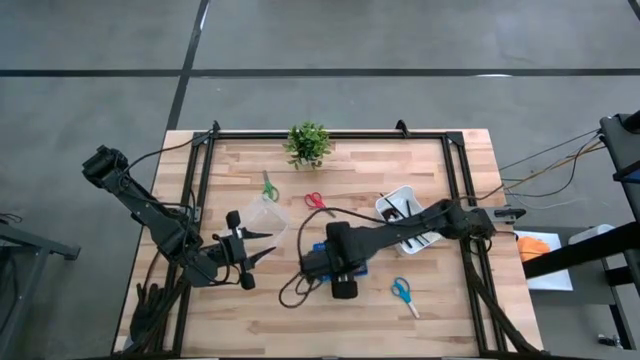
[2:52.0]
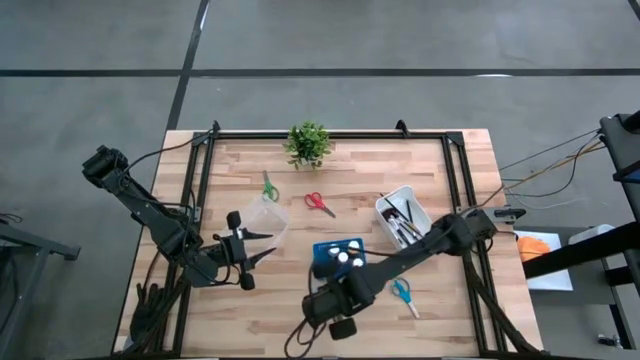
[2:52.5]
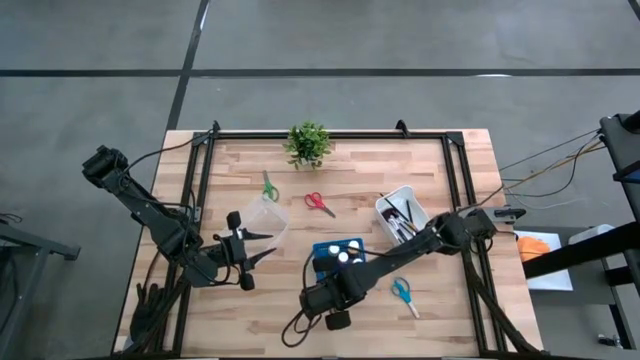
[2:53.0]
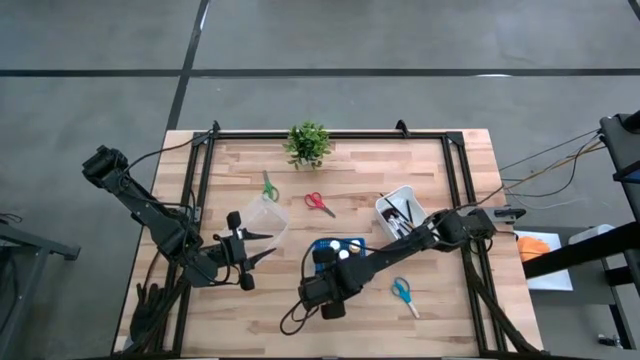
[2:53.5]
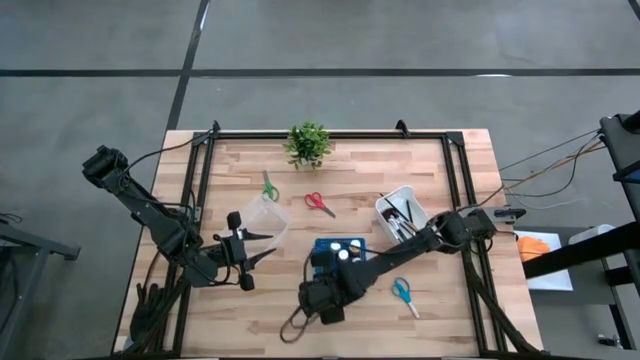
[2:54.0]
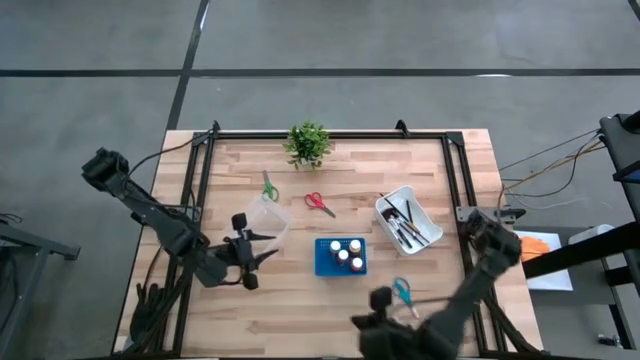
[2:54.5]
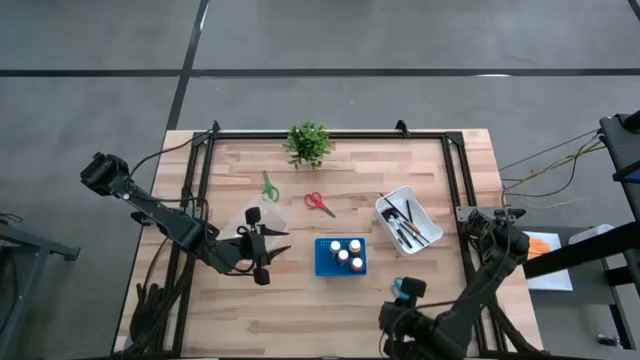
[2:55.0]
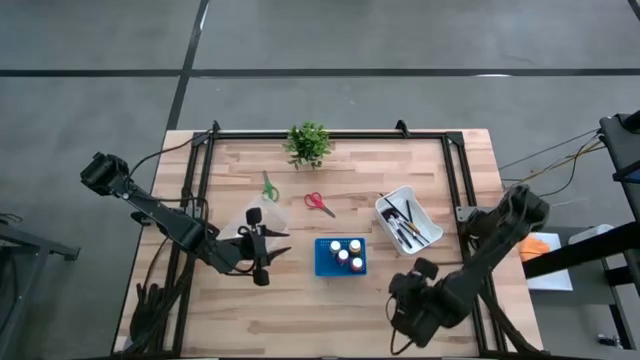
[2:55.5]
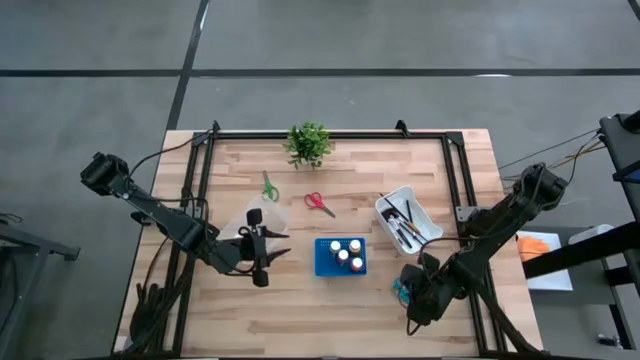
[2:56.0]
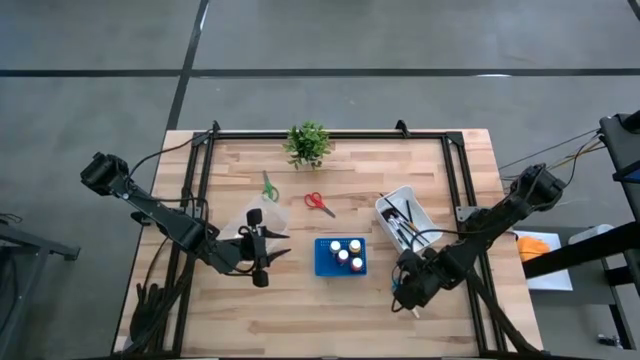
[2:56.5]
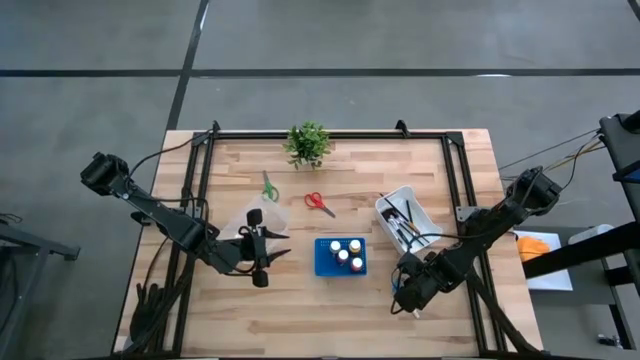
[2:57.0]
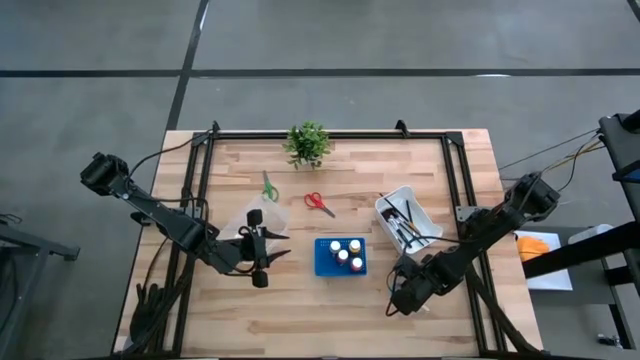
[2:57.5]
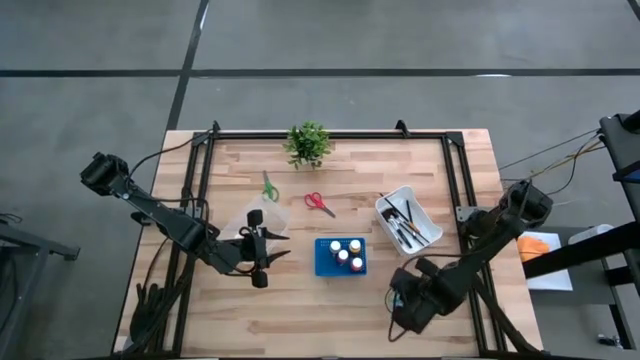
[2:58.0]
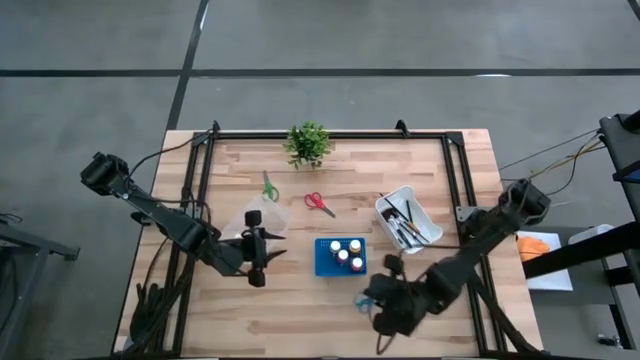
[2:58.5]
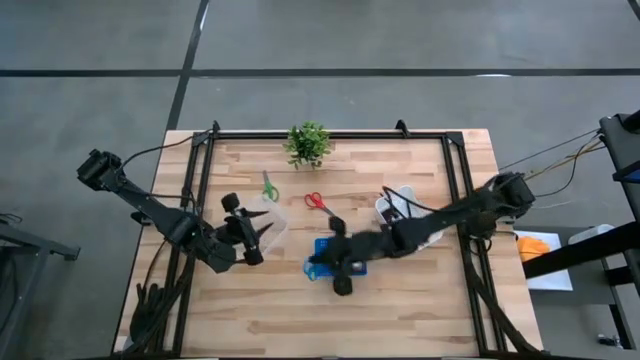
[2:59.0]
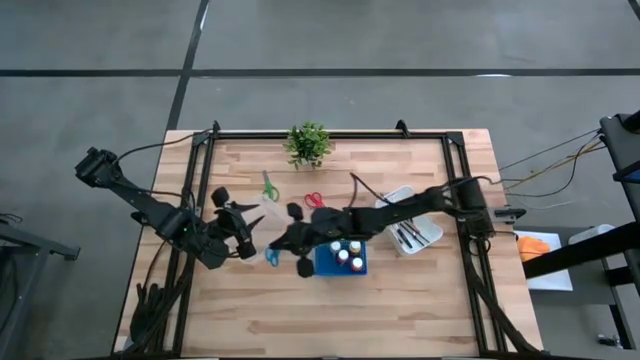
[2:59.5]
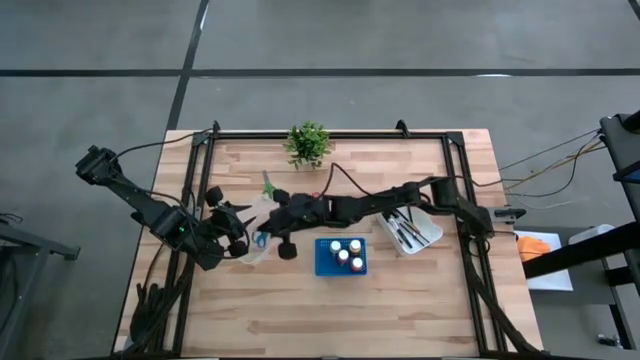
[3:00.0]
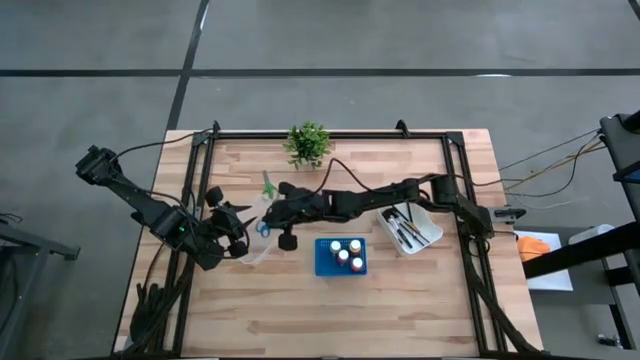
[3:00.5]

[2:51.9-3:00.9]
Task: Pick & Place Paint Supplies
Put the blue scissors in the transparent bin

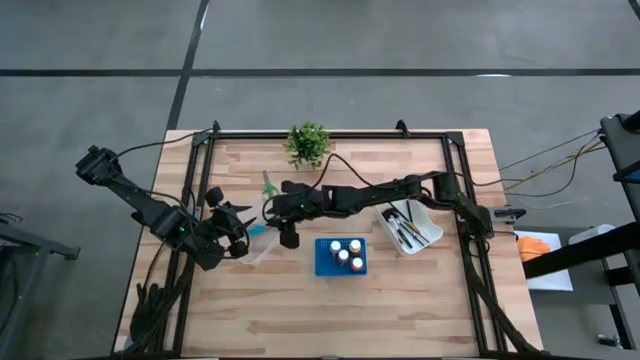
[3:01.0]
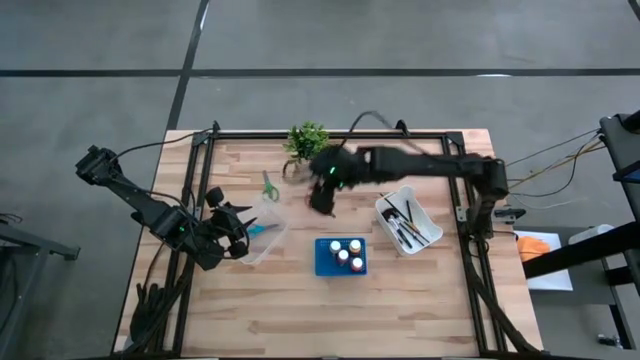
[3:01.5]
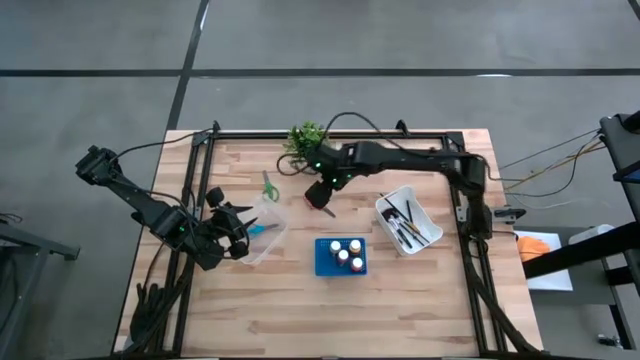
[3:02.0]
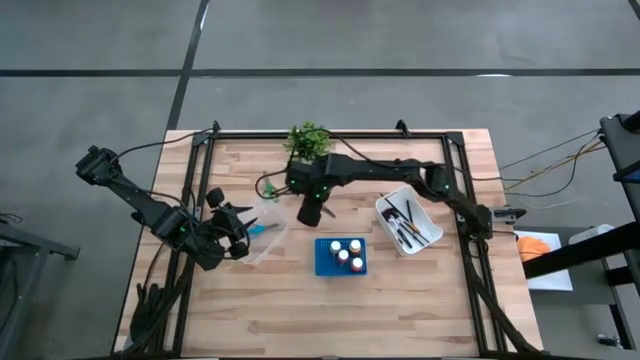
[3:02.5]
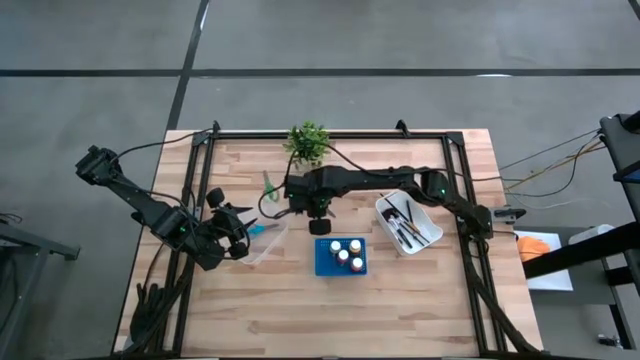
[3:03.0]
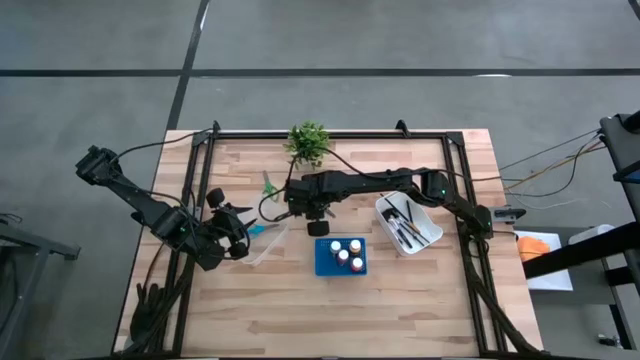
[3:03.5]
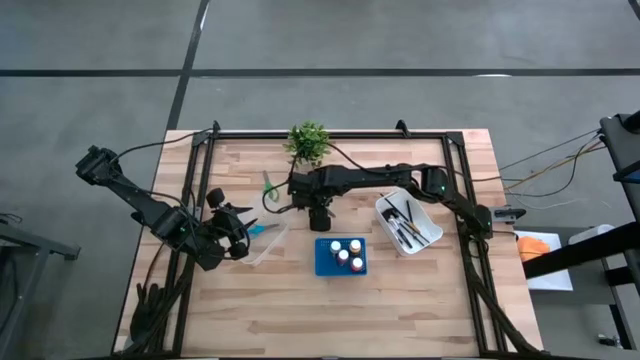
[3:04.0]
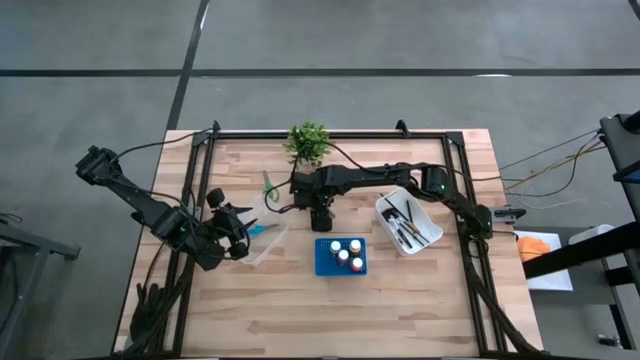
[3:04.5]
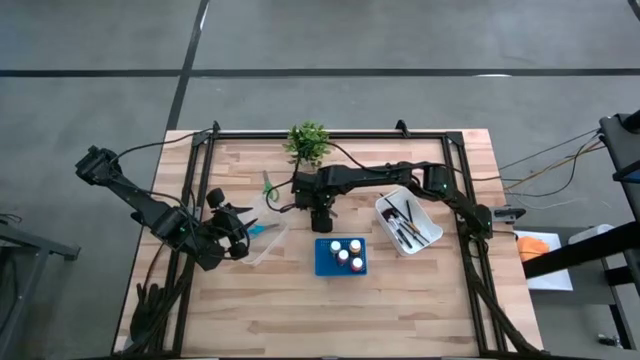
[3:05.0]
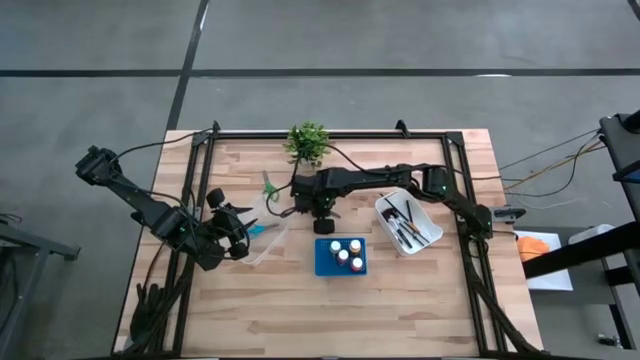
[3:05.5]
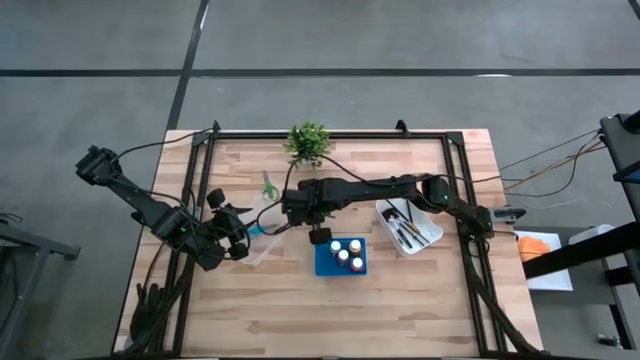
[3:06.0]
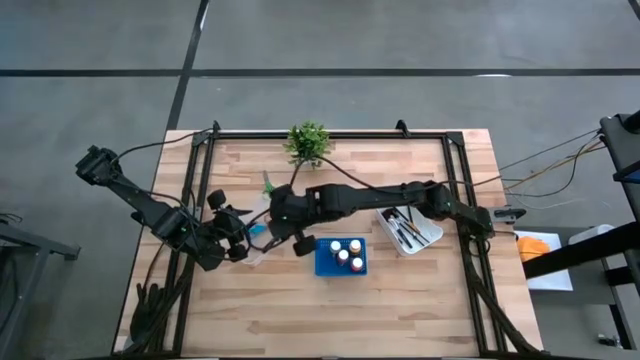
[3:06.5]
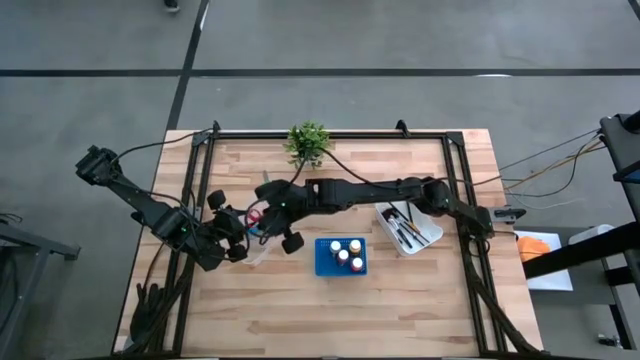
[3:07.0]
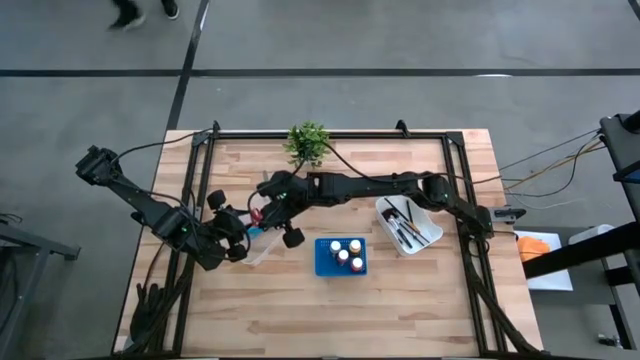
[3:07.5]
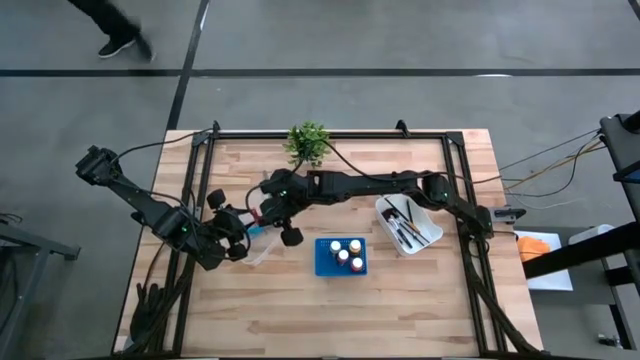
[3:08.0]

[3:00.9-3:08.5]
Put the orange scissors in the transparent bin

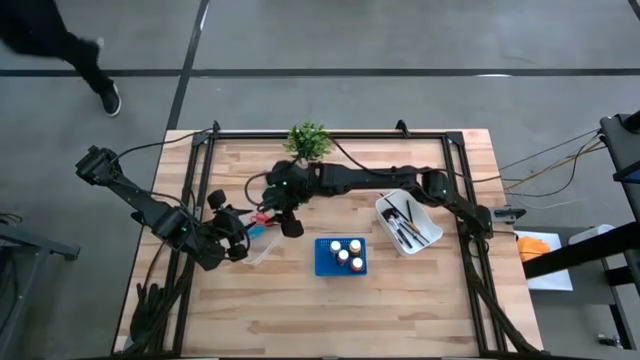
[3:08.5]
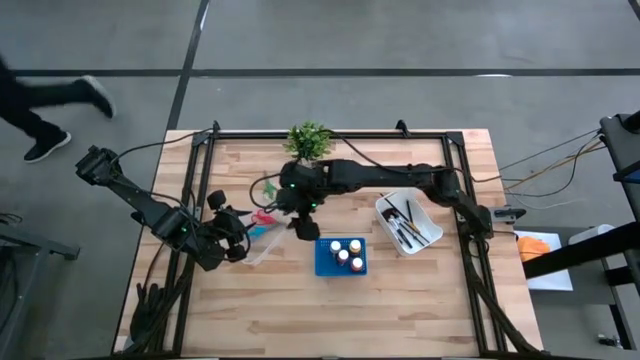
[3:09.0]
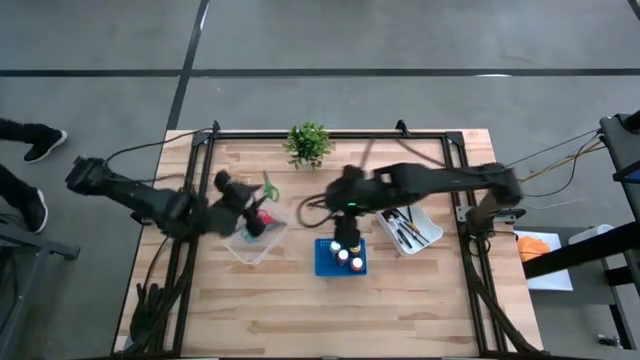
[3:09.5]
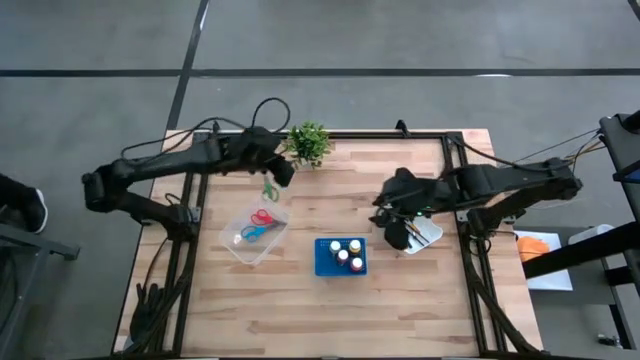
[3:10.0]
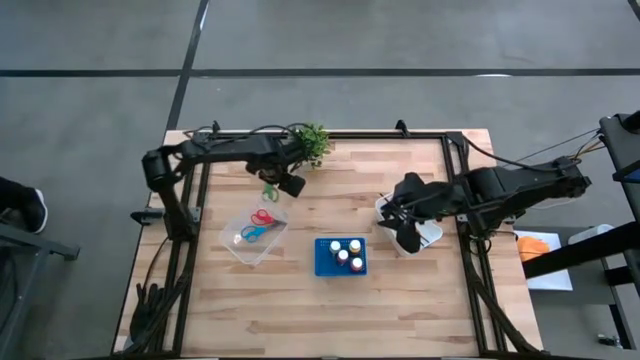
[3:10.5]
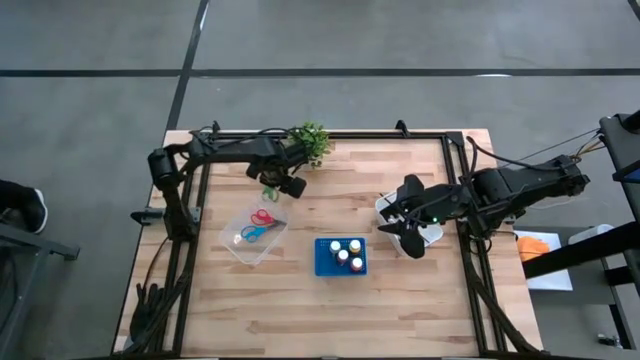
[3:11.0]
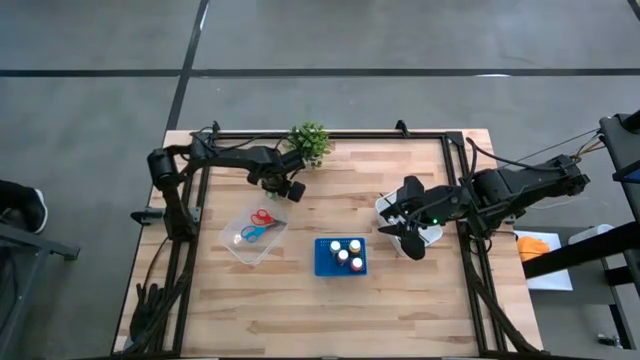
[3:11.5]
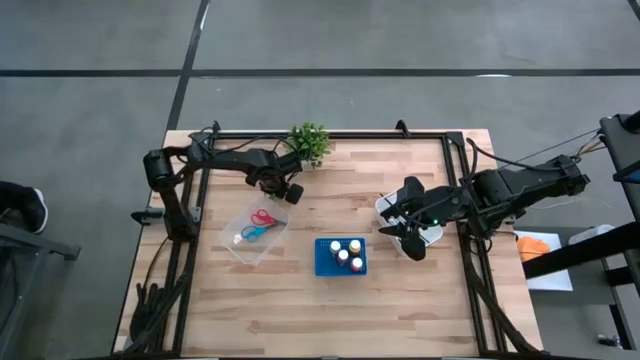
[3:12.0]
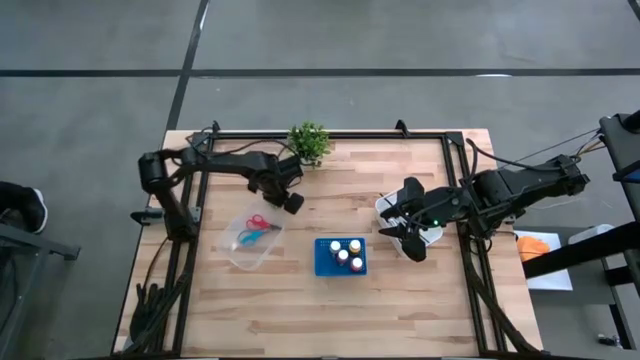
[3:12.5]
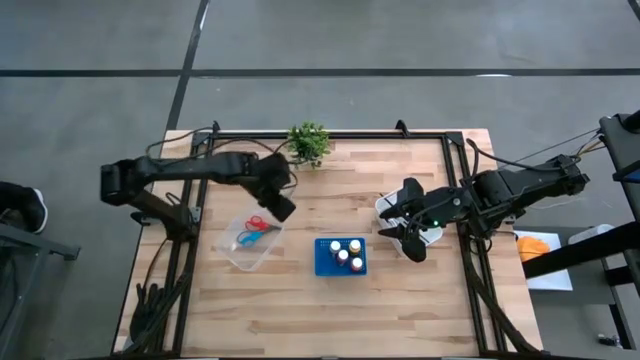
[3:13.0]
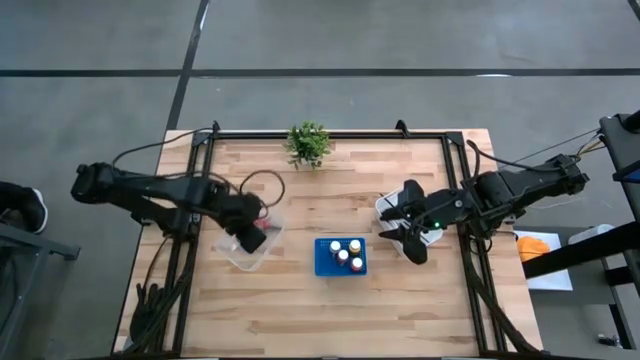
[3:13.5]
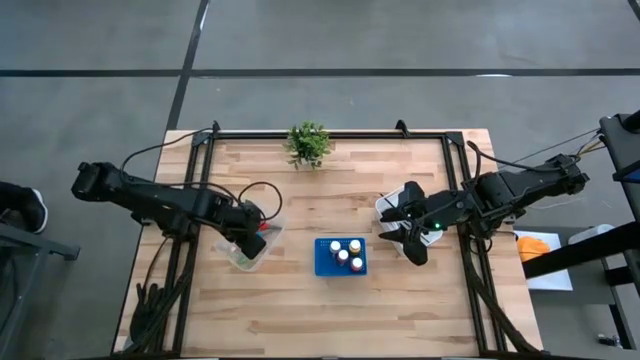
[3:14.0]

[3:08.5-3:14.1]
Put the green scissors in the transparent bin
